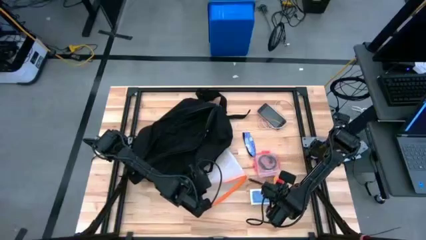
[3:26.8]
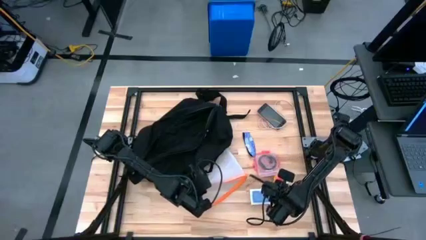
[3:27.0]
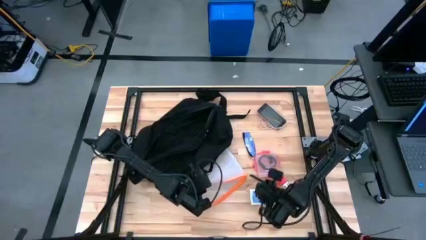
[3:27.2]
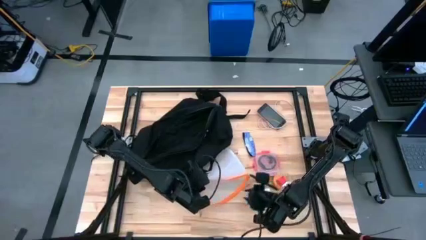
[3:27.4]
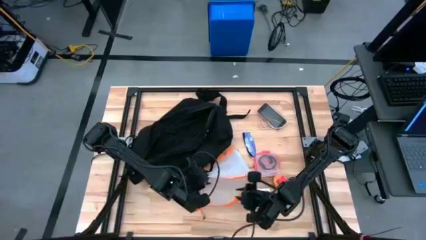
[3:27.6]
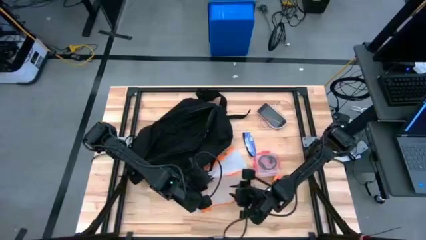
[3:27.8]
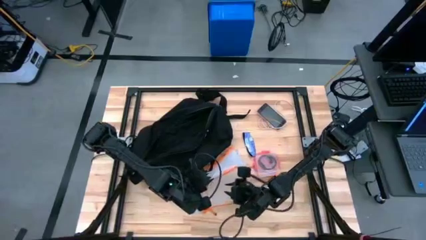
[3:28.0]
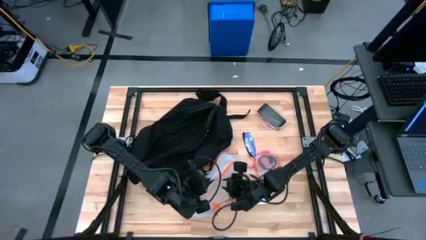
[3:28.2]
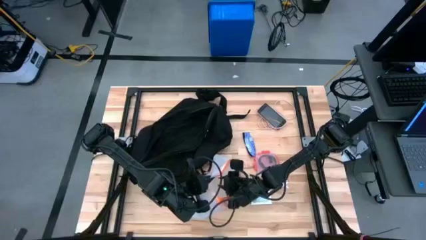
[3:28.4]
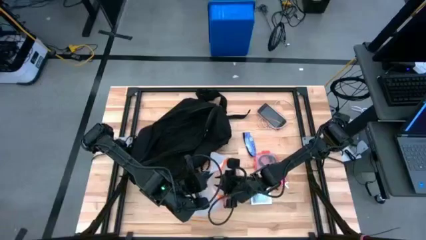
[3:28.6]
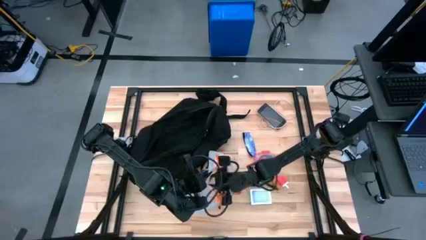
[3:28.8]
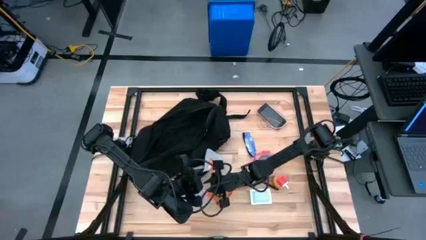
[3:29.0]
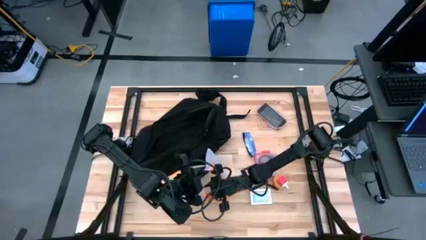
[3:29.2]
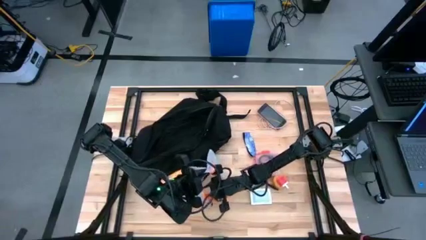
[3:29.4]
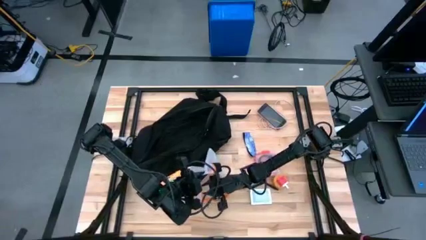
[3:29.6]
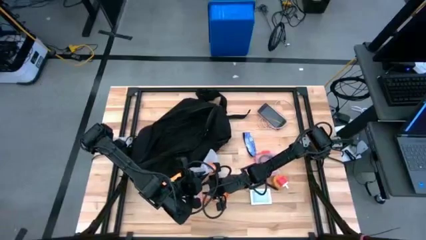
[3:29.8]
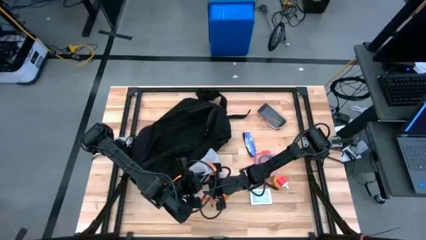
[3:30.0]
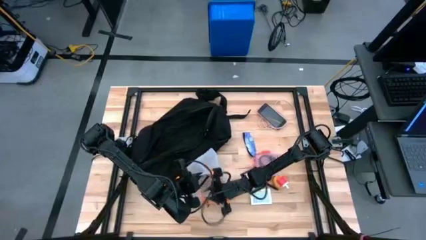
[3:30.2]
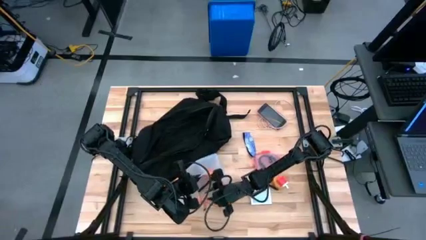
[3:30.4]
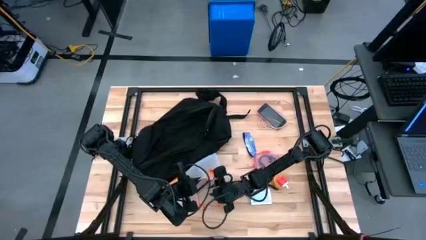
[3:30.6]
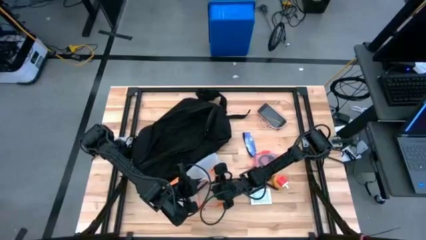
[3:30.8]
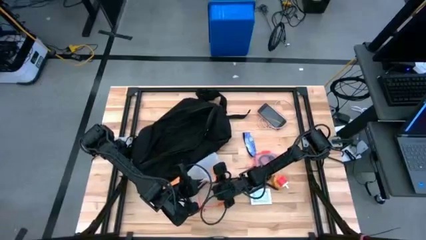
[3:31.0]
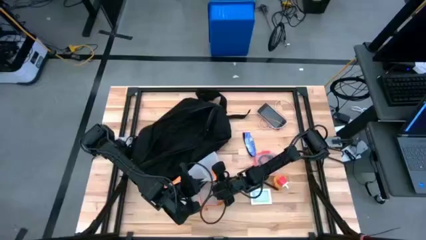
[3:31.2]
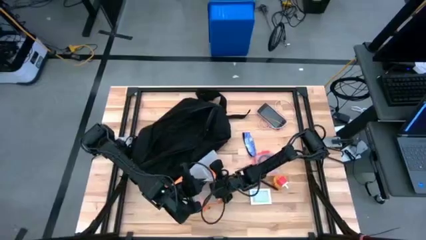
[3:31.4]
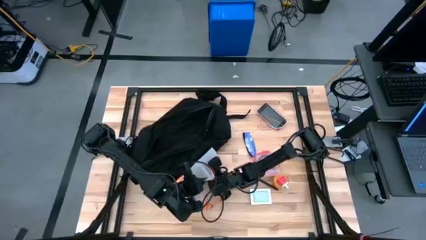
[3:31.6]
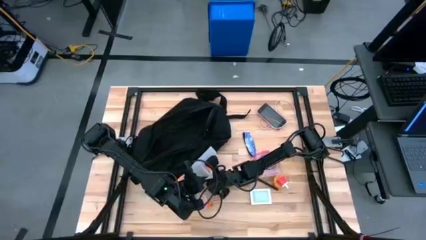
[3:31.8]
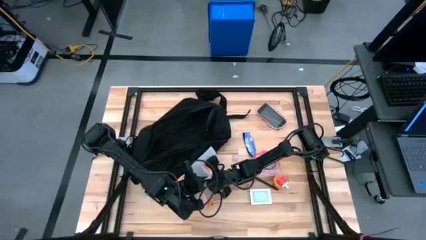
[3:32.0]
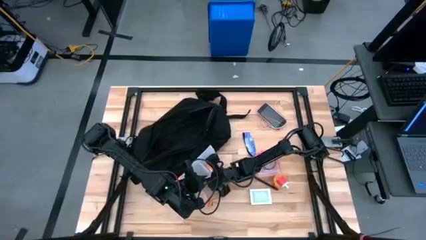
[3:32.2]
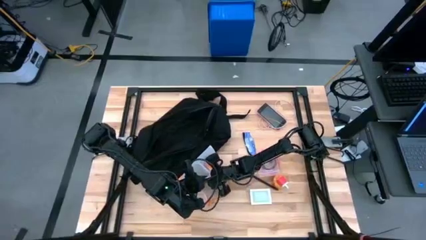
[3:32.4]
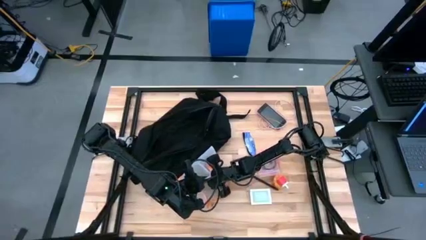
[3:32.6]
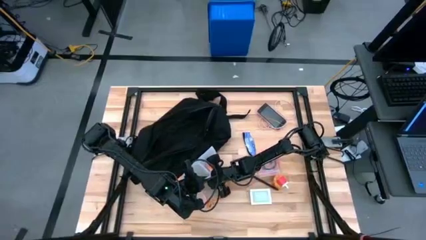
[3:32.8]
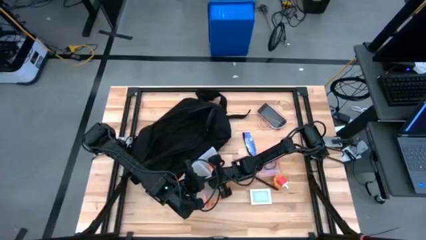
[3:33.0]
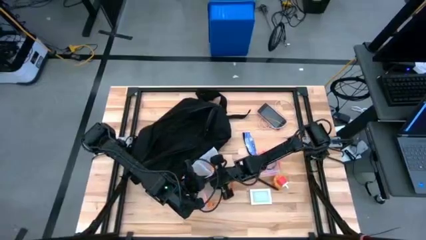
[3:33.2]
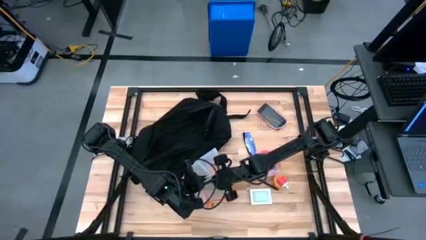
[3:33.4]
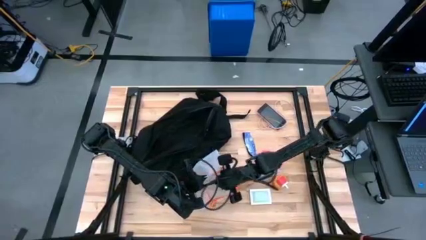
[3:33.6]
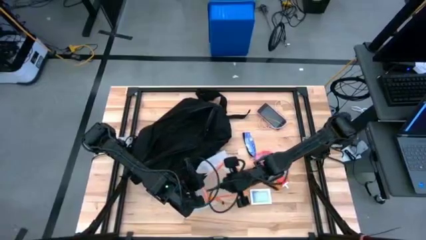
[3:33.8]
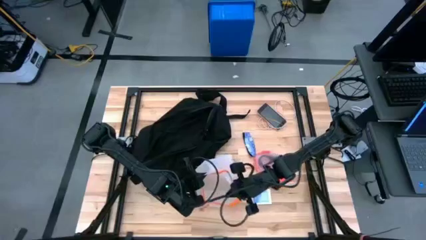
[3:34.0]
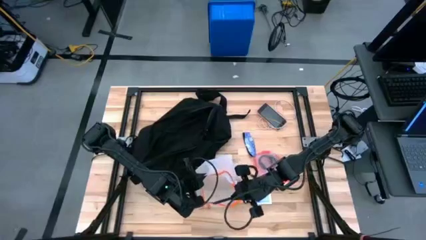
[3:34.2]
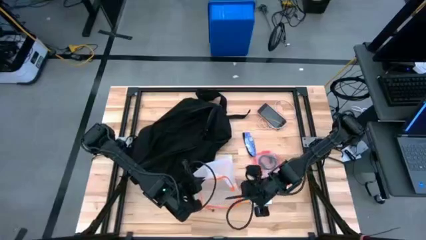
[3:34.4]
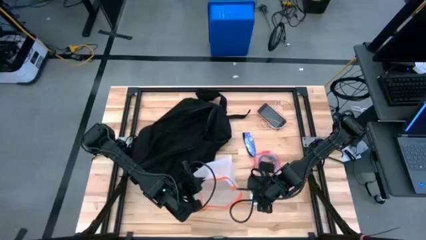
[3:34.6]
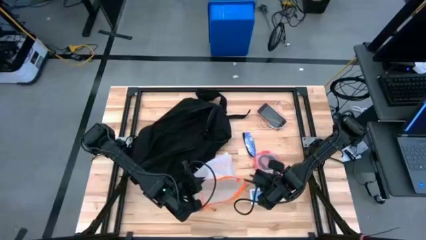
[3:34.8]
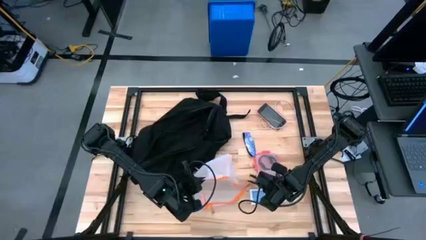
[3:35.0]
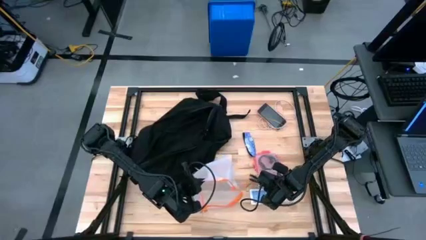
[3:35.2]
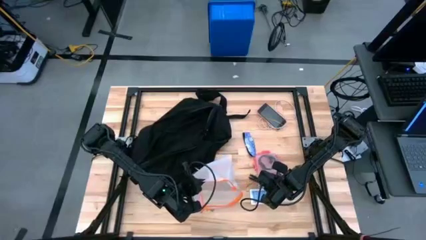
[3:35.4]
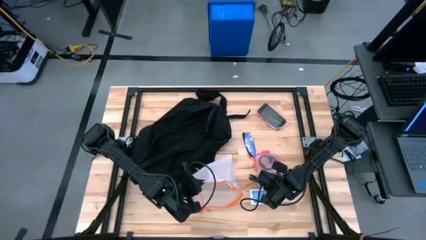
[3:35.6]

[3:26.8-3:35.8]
Task: Unpack backpack
Remove the black pen from the orange zip bag

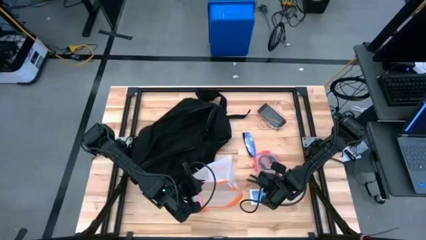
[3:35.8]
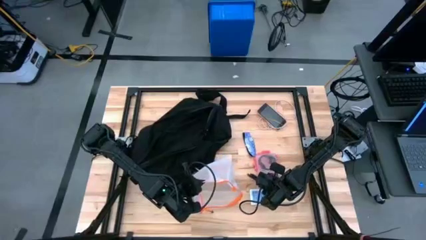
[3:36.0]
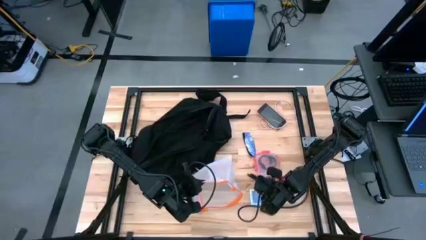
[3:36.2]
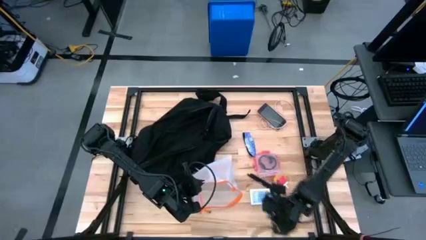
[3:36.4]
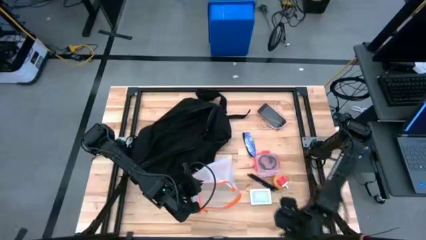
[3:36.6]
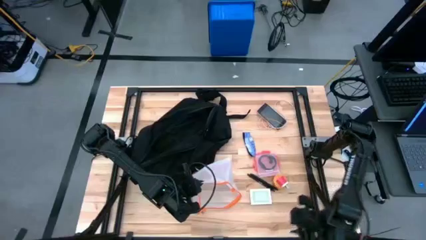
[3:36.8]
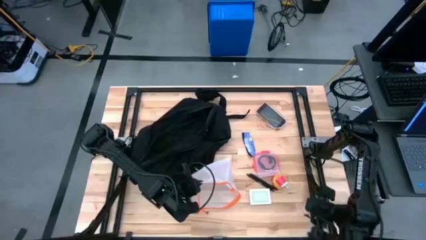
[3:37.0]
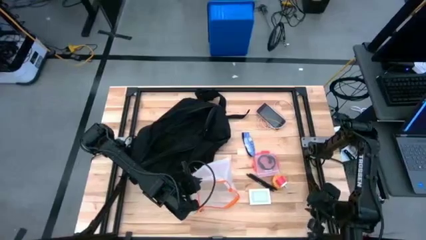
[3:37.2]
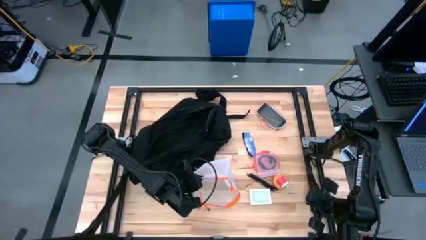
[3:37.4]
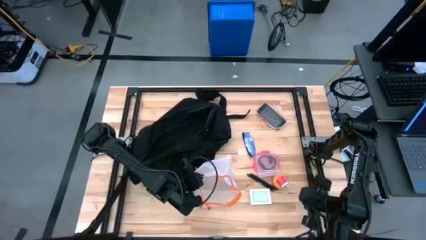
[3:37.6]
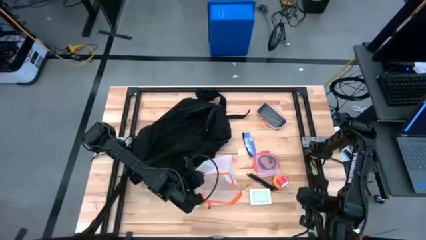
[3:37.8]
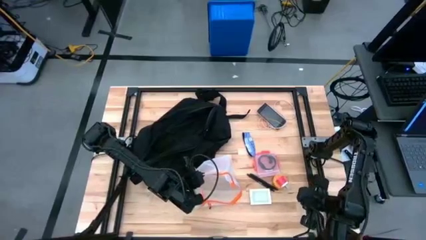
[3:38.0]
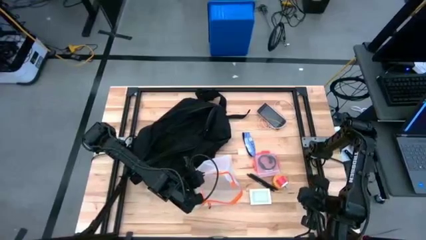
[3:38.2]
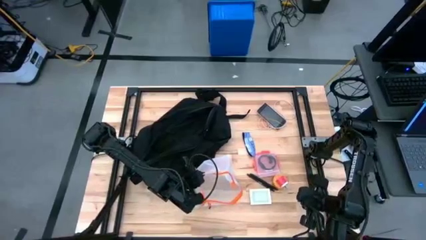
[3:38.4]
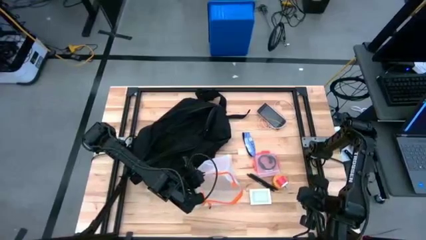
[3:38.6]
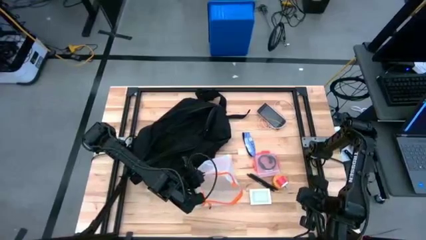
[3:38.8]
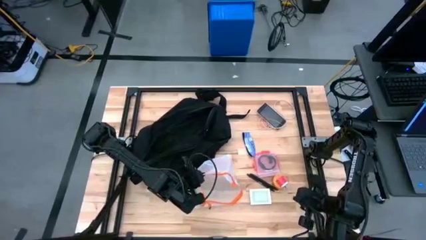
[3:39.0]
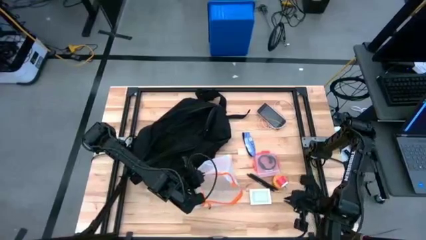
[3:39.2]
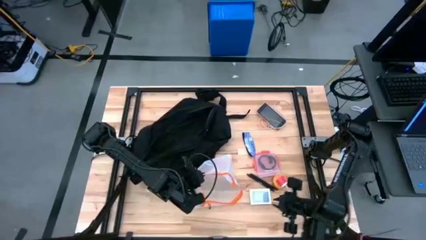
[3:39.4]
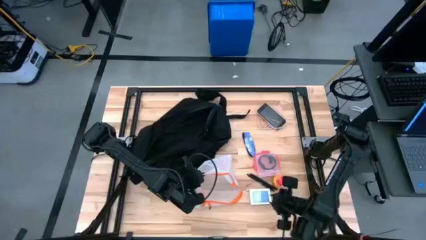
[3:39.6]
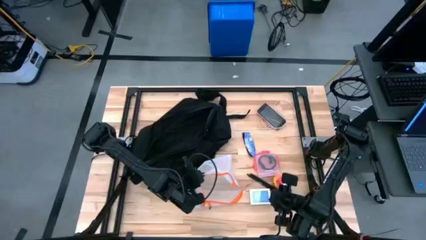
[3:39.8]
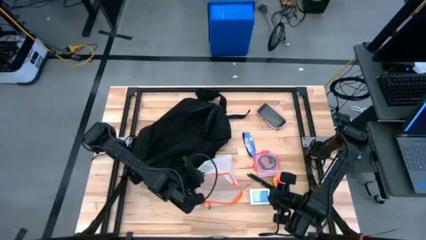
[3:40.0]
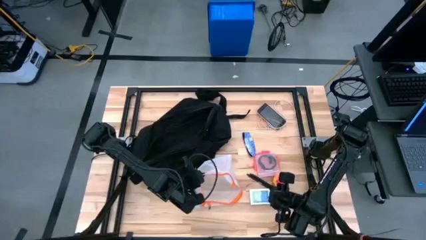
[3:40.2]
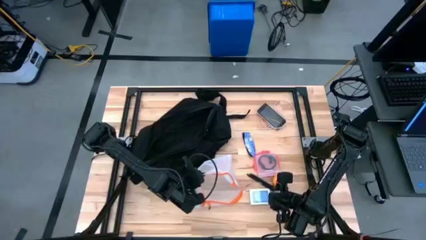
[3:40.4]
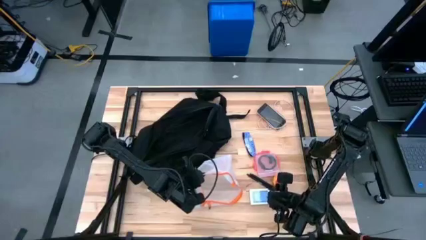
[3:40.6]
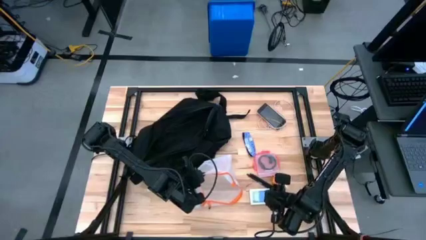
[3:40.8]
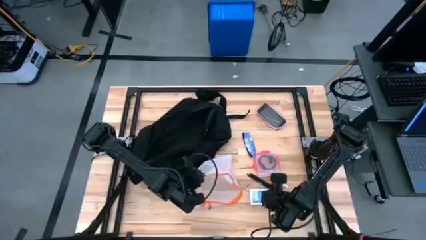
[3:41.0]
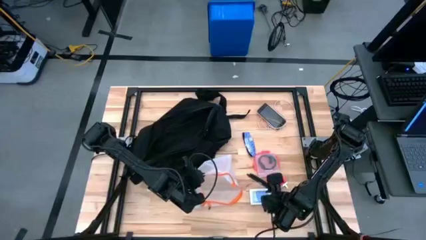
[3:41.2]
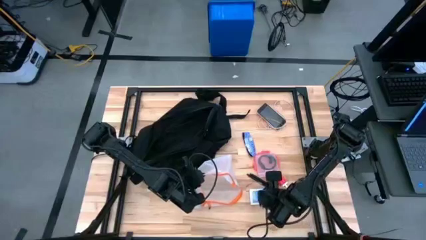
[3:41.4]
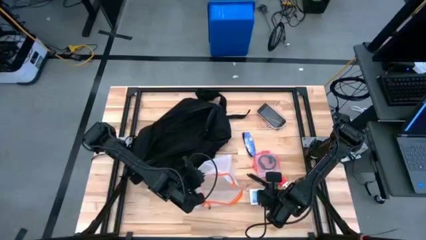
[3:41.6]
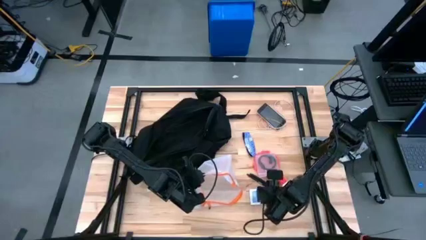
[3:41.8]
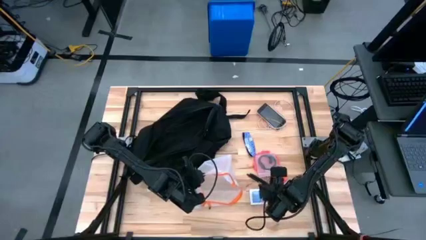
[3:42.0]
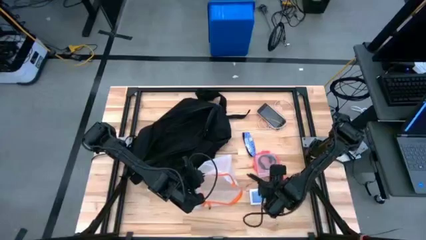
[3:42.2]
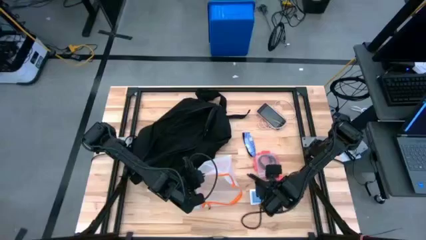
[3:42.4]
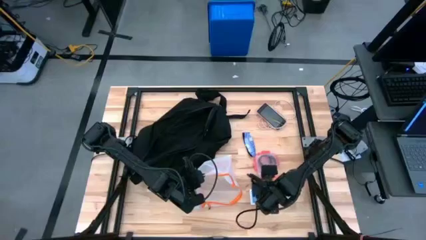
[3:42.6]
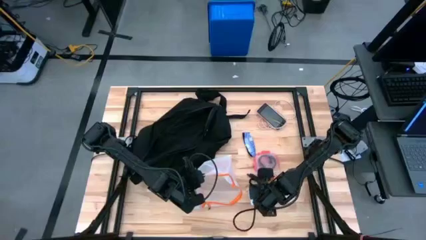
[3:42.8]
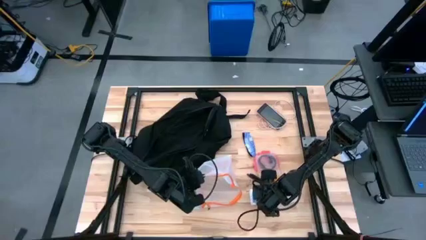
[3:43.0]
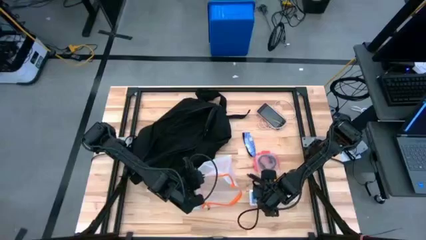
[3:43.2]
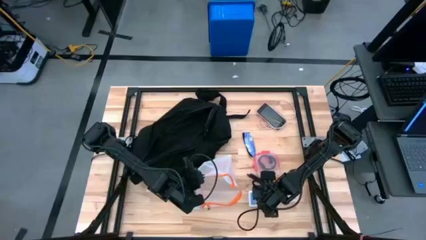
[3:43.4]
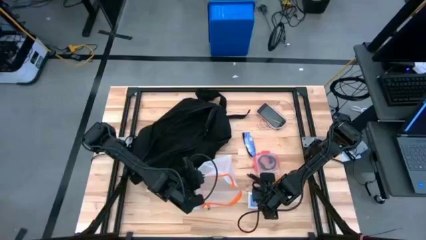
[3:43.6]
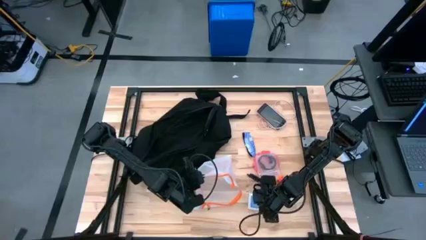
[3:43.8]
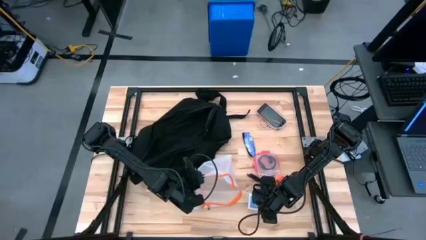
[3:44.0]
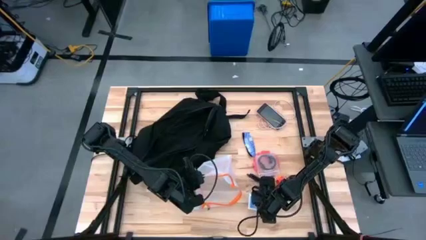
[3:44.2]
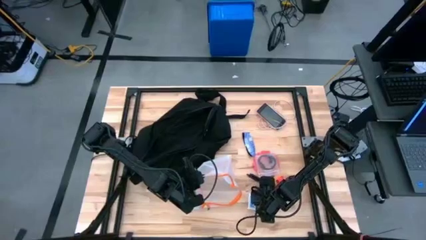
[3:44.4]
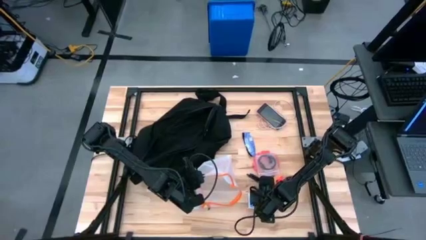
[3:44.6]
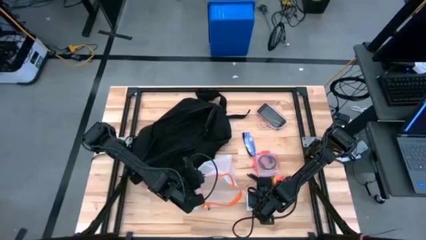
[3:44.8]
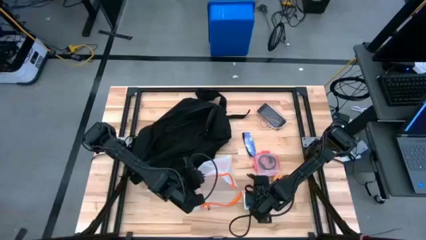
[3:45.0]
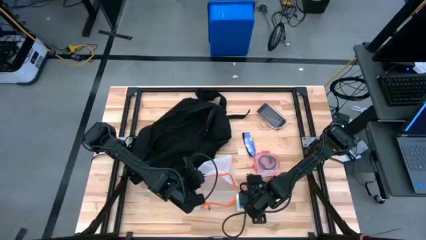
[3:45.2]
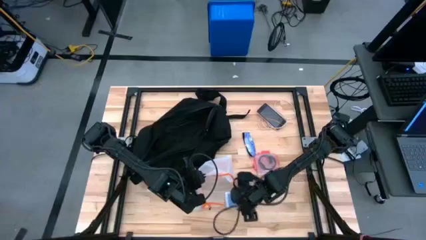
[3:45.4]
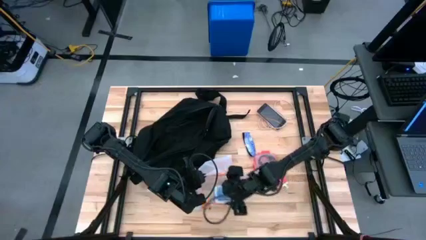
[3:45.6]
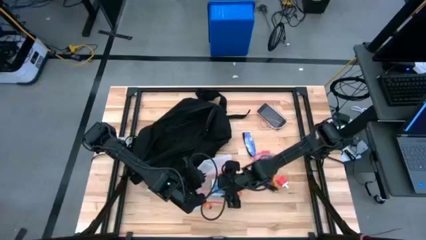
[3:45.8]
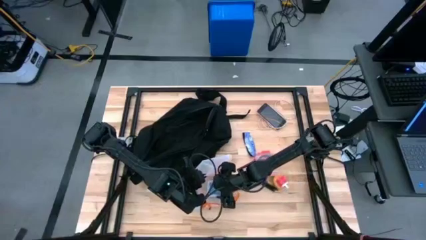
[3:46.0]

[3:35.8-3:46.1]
Put the blue game card into the orange zip bag
